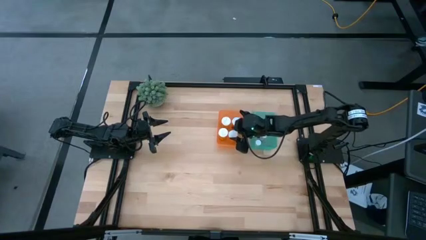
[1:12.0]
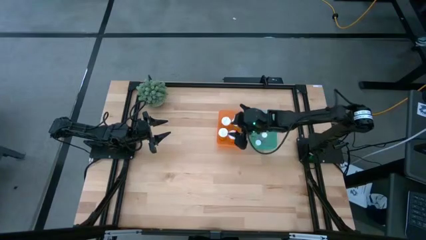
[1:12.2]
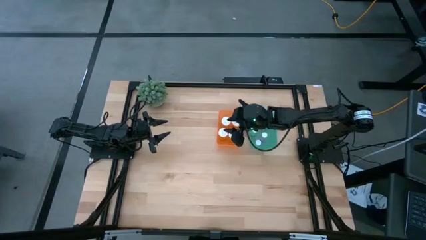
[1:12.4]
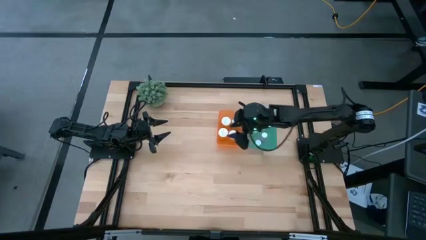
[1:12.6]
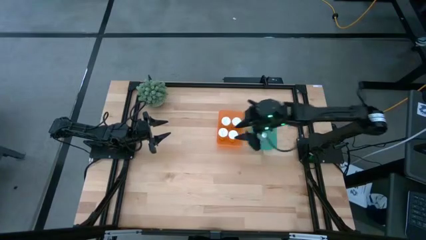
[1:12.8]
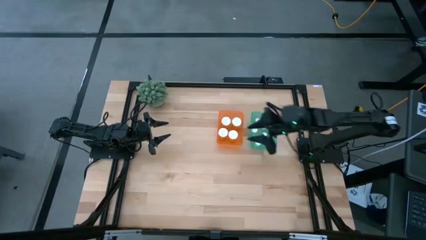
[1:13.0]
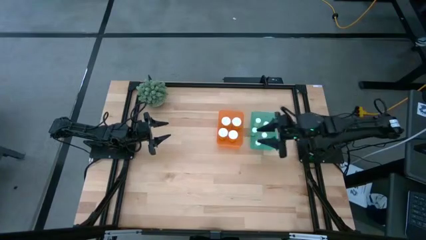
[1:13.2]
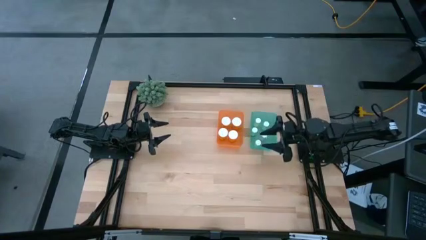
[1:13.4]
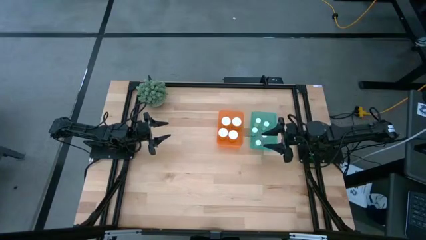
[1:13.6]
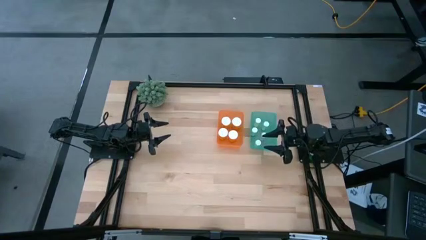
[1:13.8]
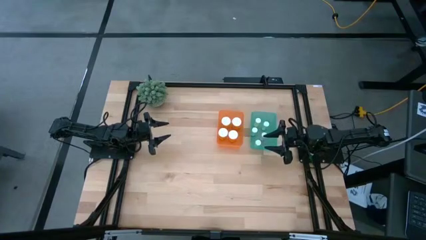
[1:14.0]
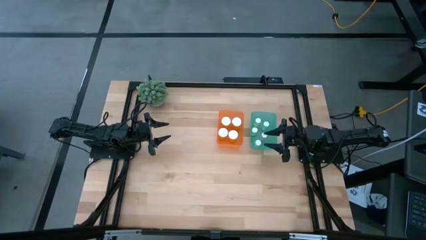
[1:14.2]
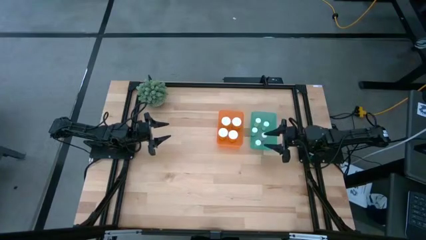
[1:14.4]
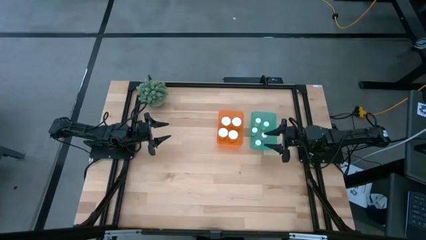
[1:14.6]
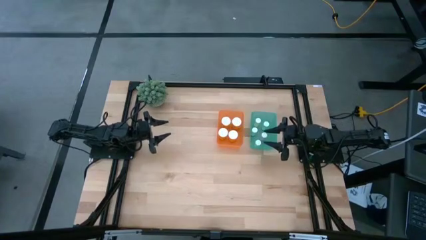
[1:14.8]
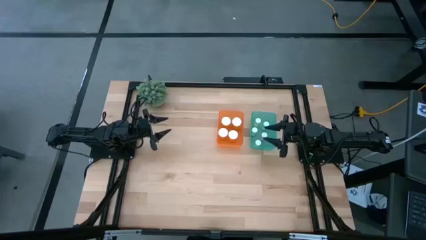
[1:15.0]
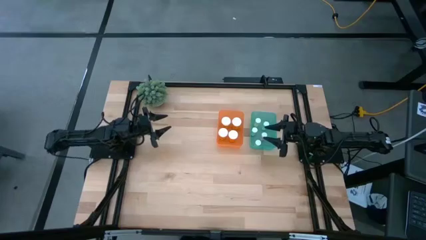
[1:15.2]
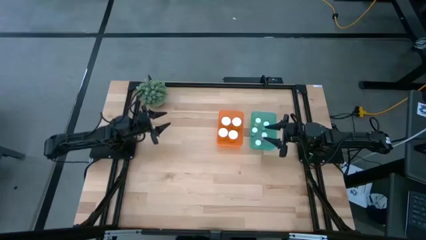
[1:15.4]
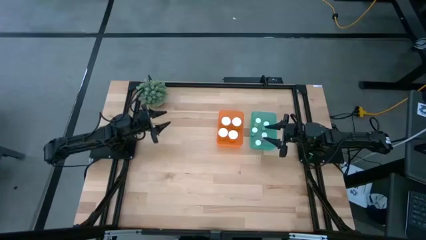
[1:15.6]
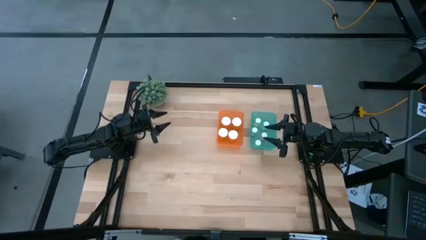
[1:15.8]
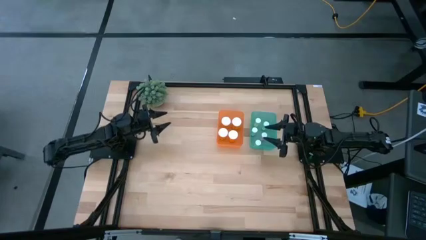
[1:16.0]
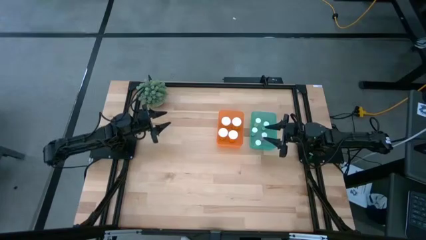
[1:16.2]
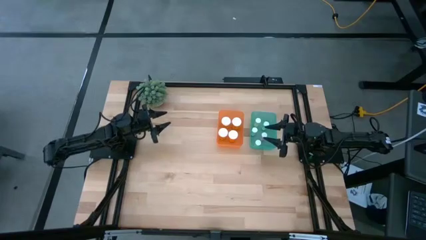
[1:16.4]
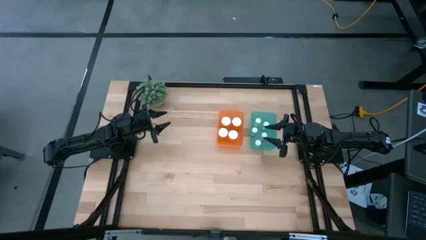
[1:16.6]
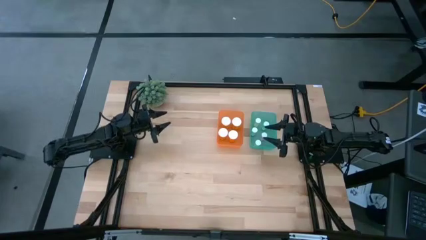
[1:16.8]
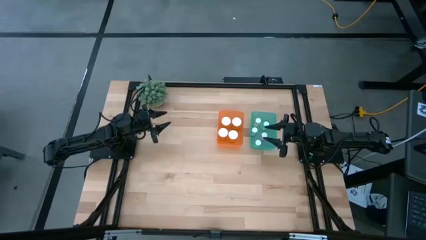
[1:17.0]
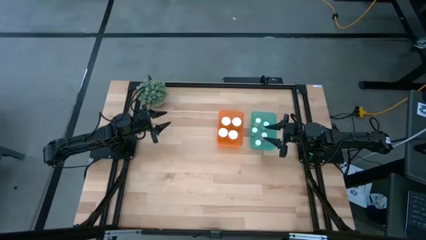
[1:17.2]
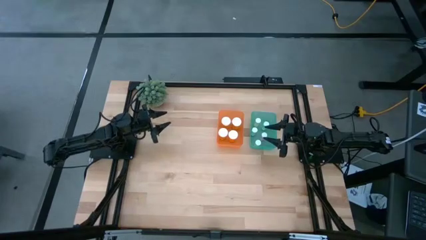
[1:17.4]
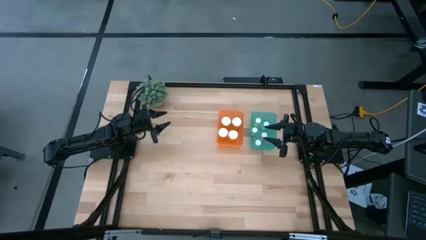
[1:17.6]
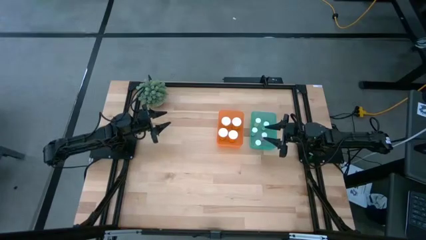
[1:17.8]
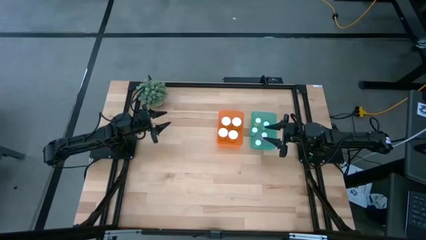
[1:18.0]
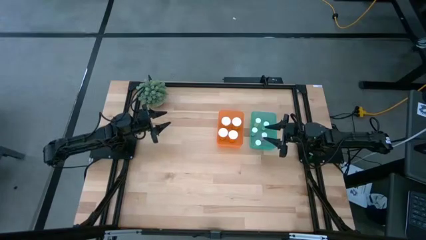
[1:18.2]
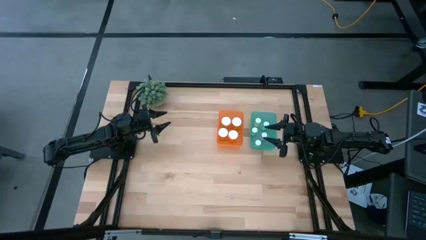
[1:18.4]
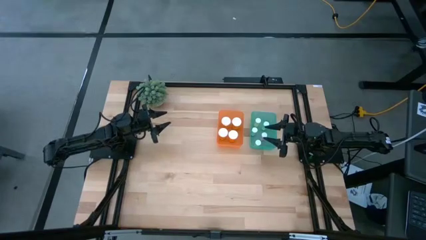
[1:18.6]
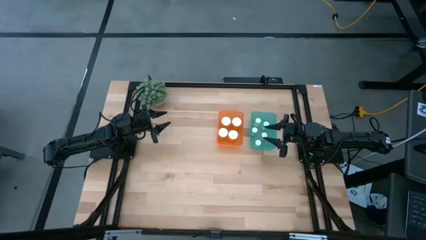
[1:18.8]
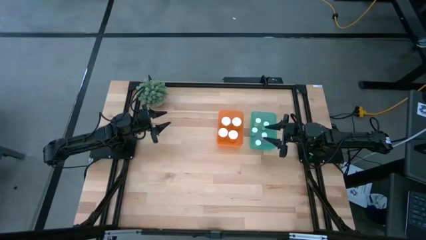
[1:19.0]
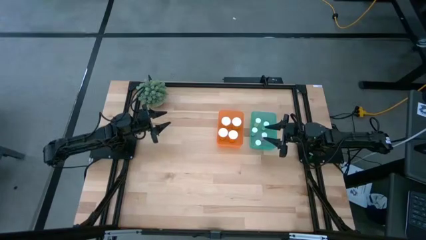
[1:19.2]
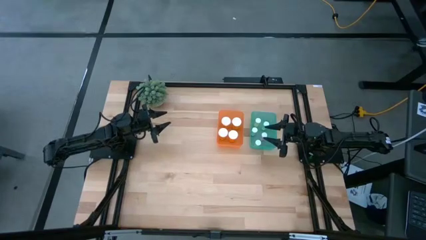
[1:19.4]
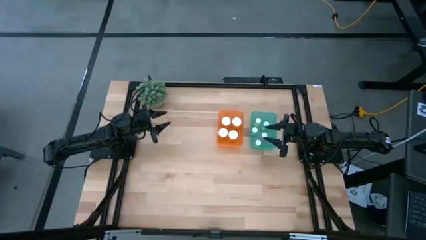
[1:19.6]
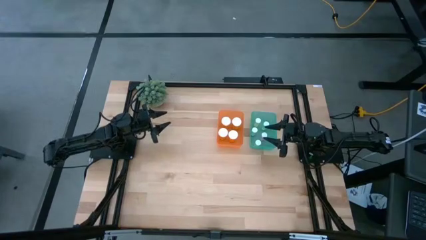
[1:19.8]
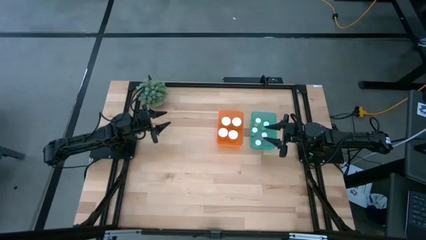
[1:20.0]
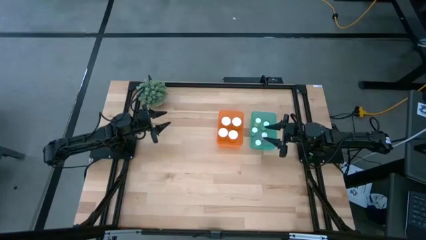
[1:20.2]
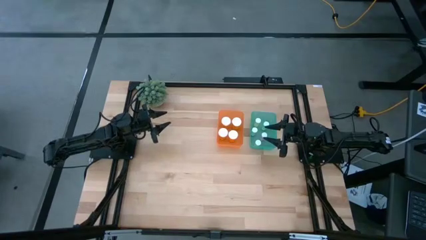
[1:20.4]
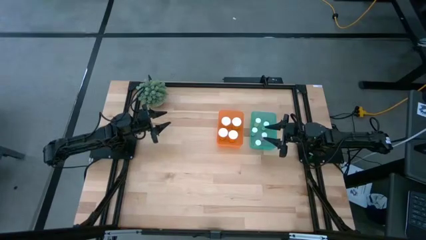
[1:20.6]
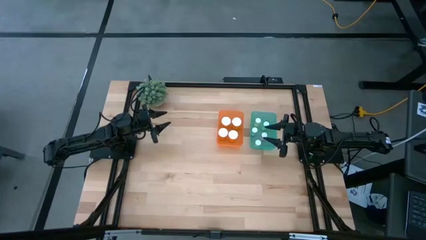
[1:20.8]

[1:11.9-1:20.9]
Task: Pick and place medicine bottles into bin by pill shape (circle, oval)
Return to Home Position

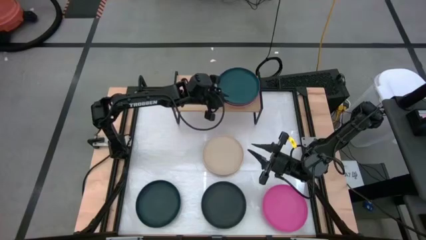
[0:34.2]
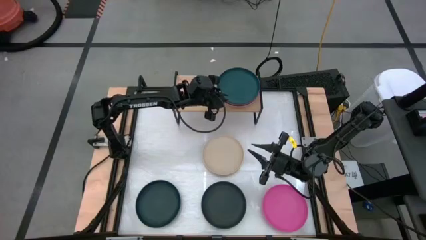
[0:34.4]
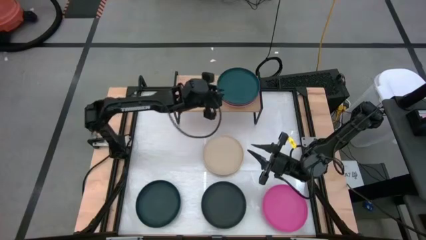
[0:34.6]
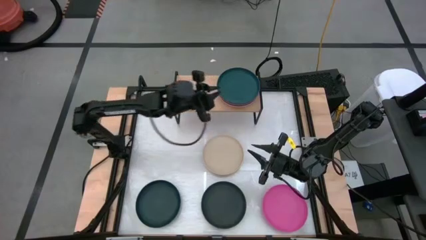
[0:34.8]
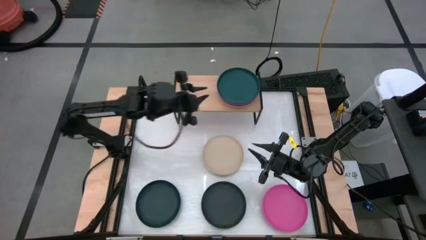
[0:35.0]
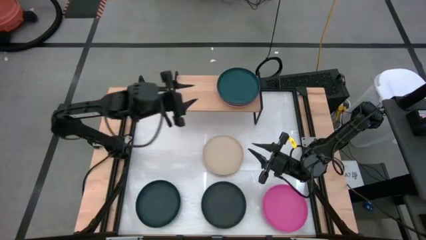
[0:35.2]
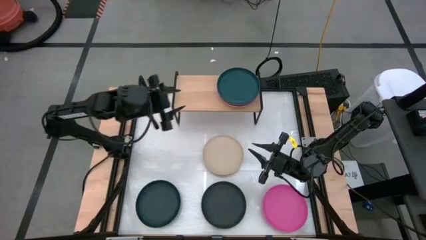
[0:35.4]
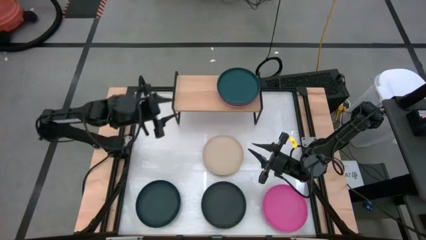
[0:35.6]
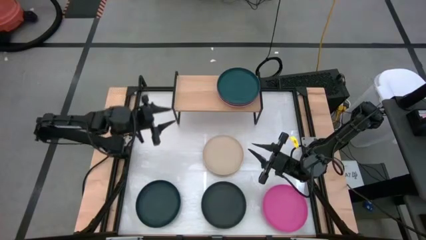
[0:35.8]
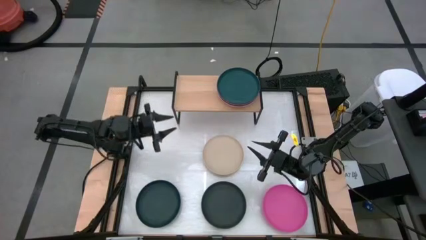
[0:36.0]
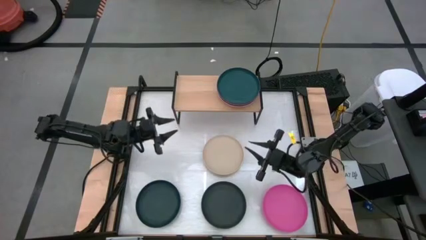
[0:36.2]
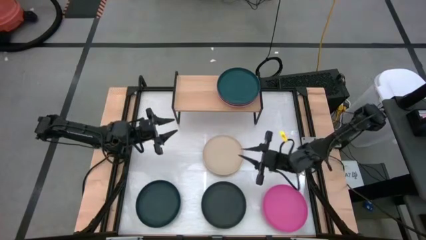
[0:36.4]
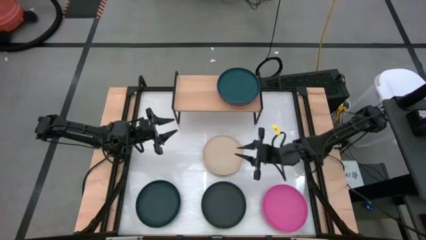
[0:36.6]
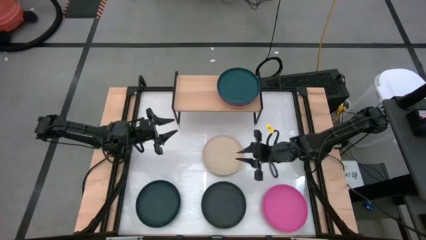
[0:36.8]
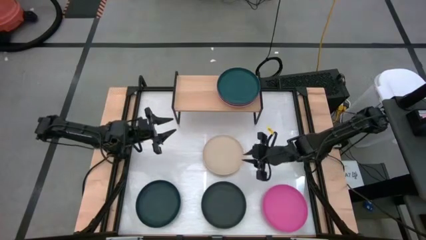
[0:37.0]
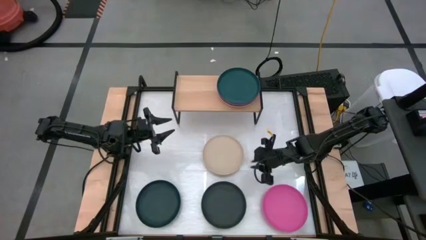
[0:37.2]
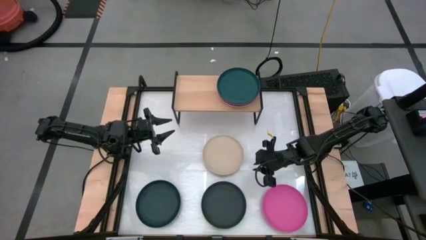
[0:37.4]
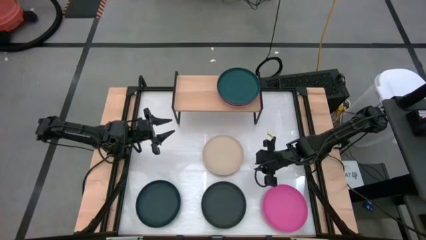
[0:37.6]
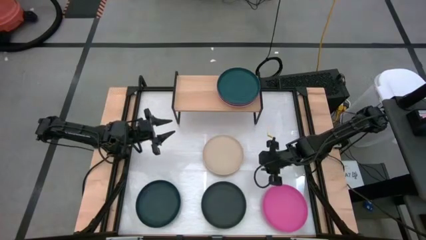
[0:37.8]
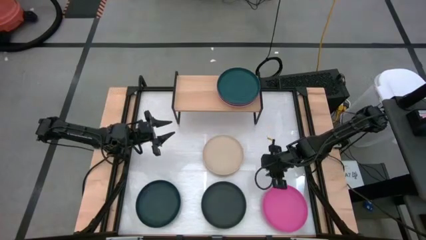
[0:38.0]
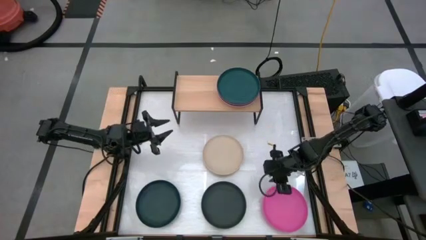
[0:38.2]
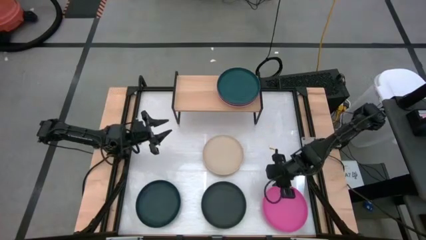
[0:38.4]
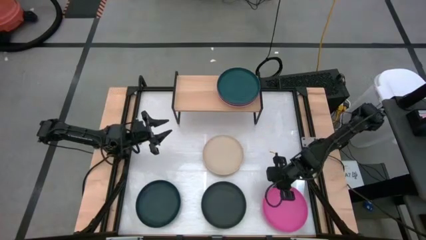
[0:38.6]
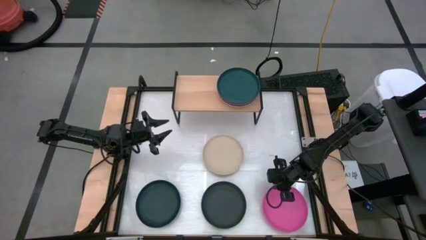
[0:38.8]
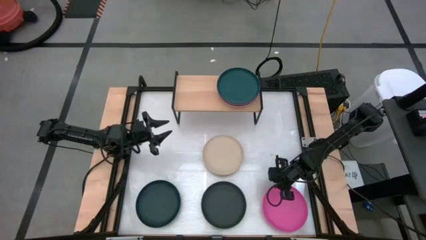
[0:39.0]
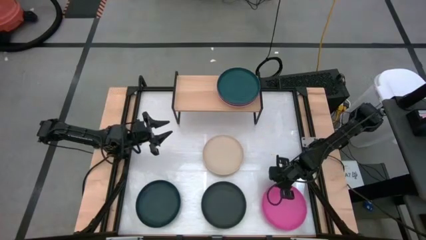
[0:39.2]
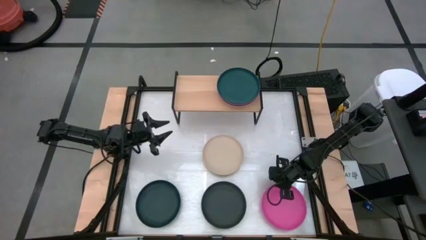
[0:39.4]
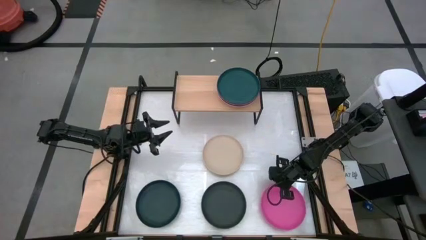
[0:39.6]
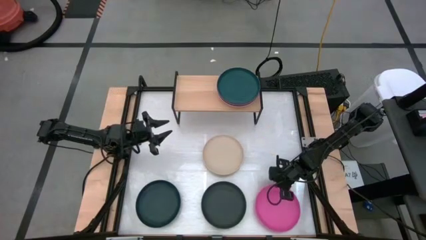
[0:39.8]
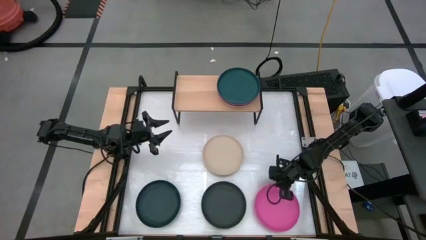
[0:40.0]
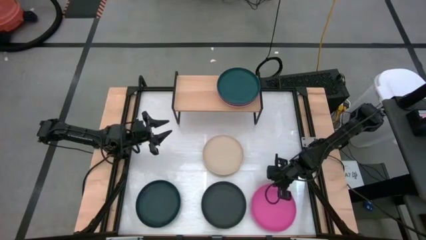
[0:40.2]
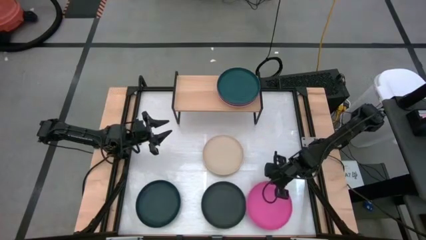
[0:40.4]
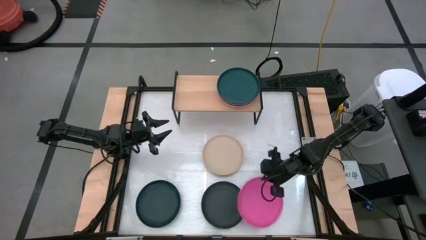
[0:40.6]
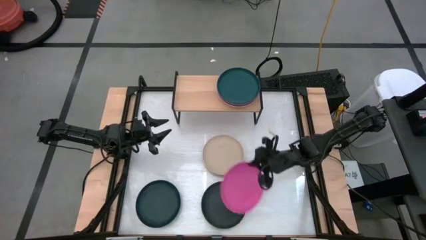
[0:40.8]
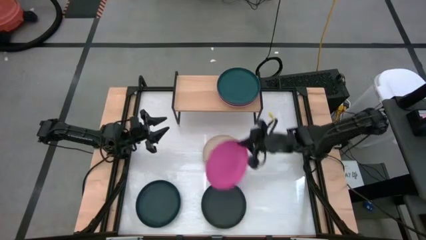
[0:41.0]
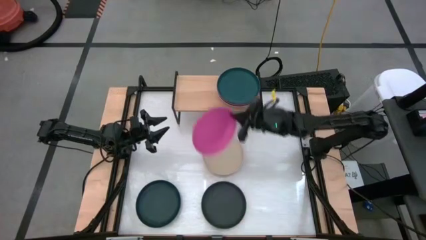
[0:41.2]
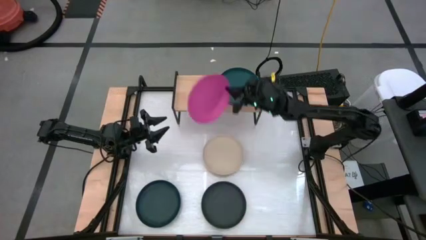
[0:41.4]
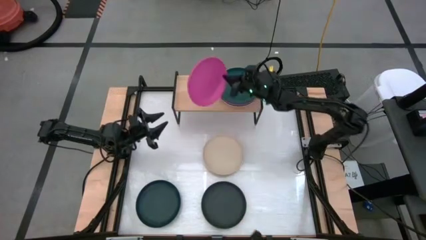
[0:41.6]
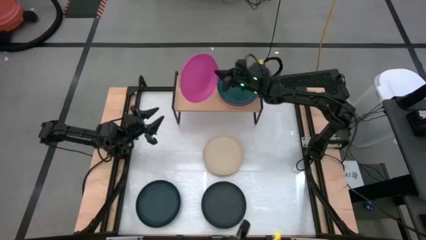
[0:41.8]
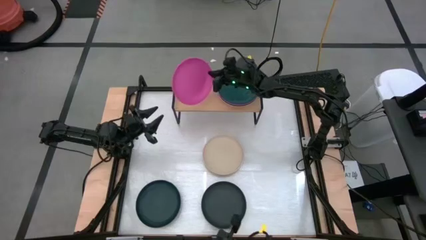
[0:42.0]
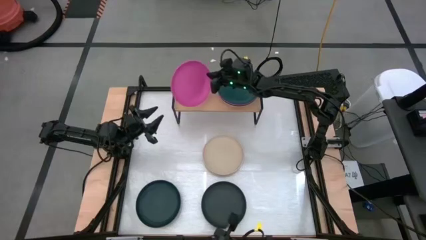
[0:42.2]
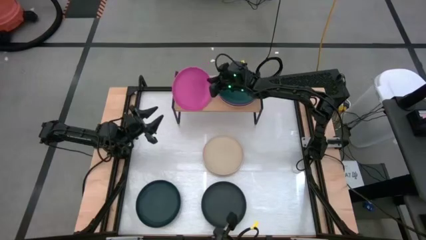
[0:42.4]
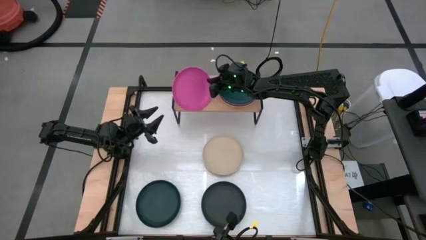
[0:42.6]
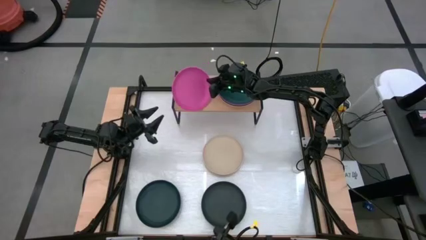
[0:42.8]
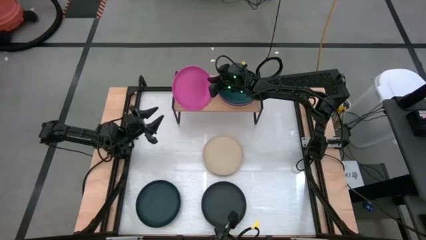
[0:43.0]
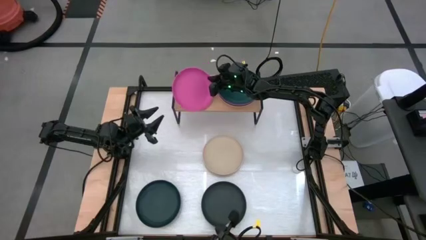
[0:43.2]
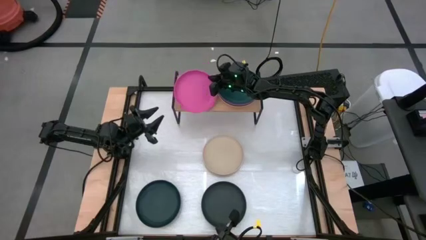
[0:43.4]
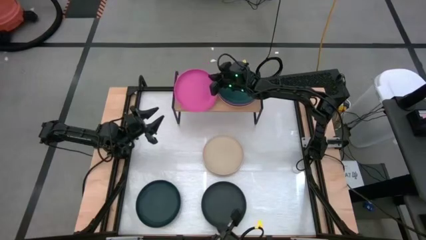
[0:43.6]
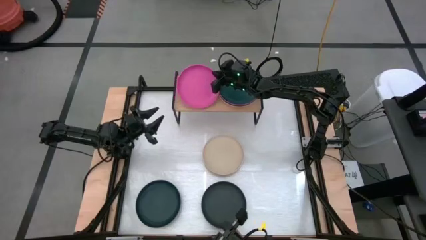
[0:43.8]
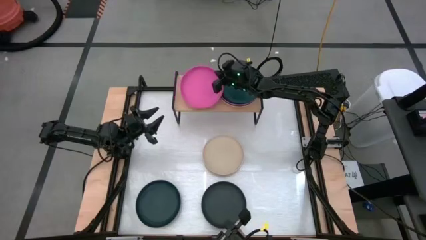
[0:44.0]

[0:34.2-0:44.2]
Task: Place and stack plates onto a shelf
Put the pink plate on the shelf
